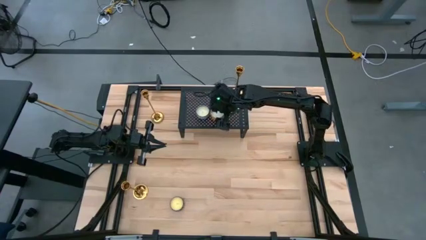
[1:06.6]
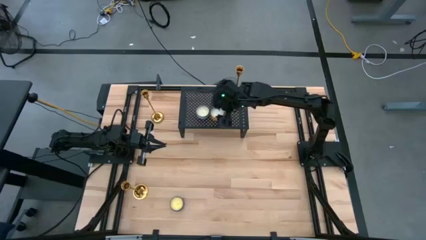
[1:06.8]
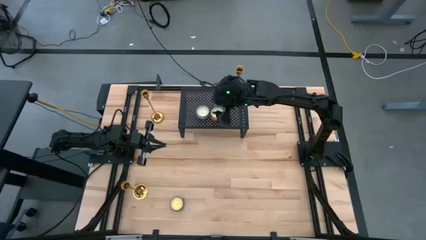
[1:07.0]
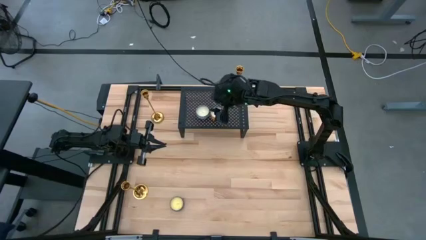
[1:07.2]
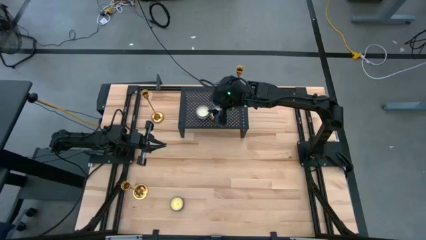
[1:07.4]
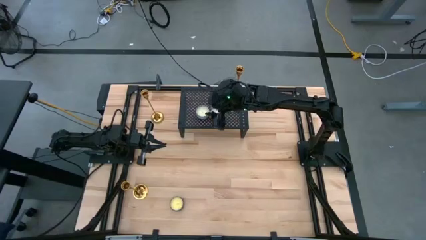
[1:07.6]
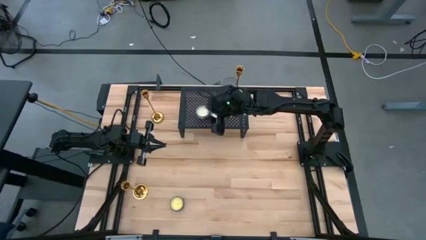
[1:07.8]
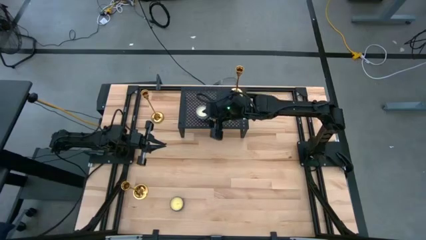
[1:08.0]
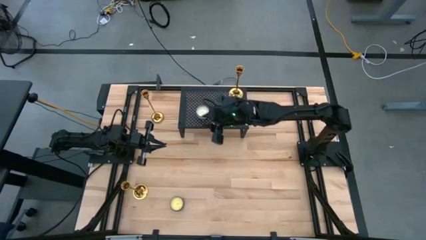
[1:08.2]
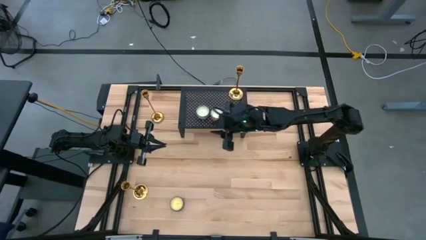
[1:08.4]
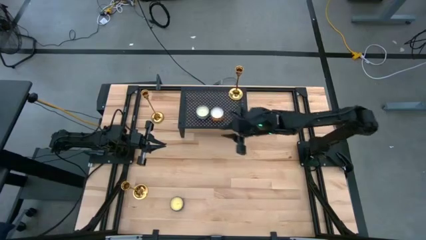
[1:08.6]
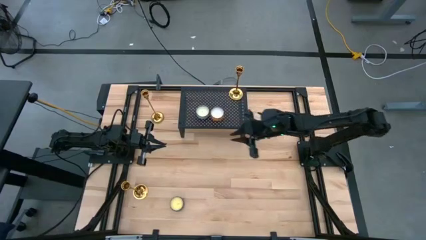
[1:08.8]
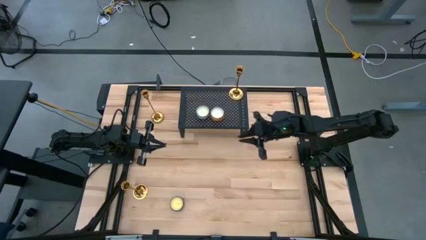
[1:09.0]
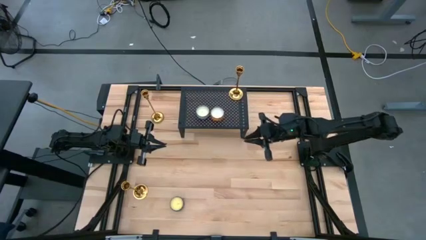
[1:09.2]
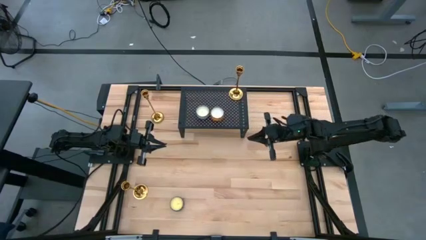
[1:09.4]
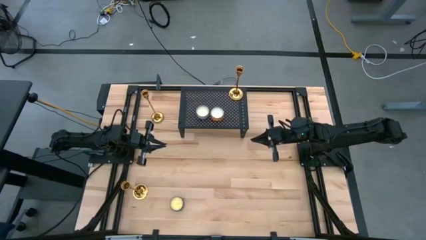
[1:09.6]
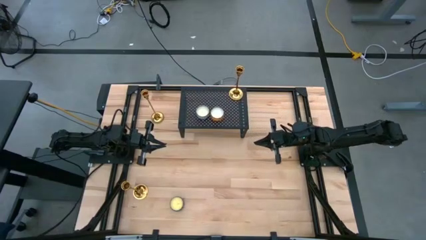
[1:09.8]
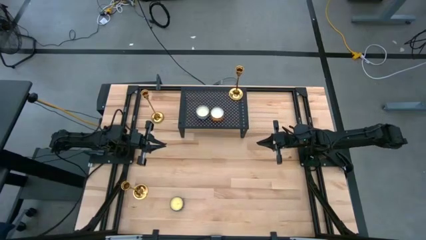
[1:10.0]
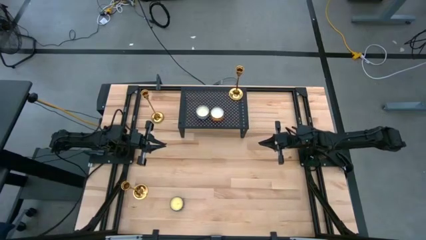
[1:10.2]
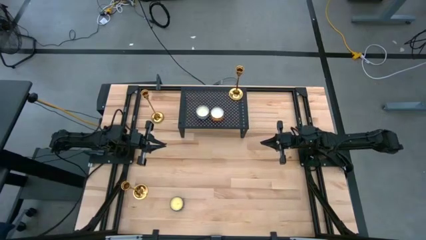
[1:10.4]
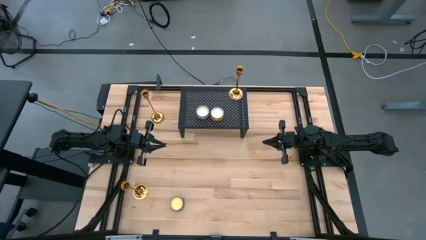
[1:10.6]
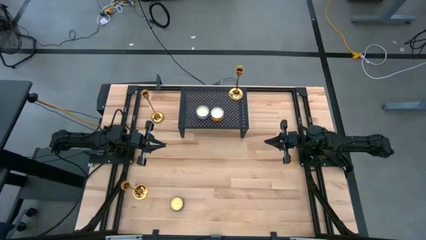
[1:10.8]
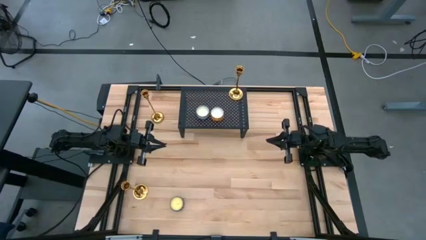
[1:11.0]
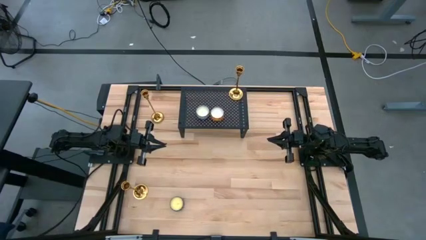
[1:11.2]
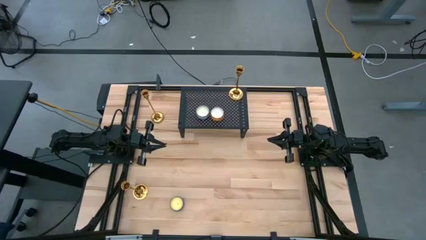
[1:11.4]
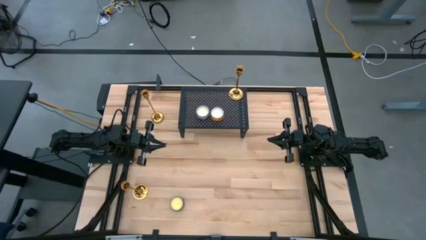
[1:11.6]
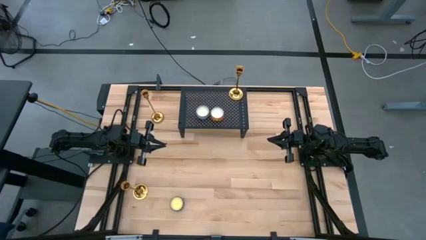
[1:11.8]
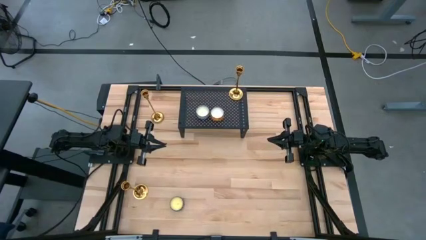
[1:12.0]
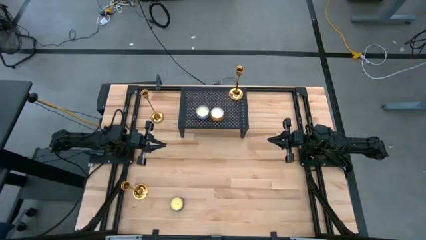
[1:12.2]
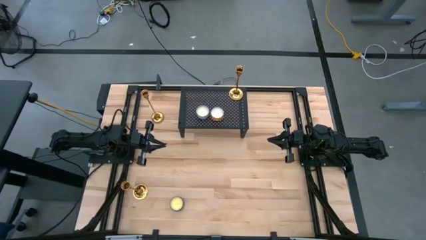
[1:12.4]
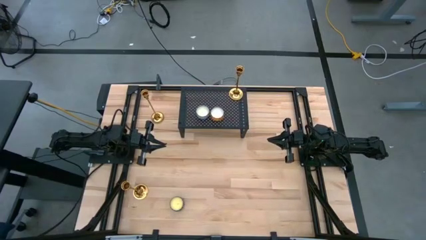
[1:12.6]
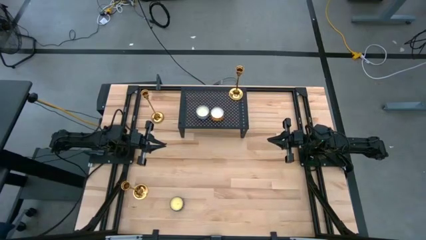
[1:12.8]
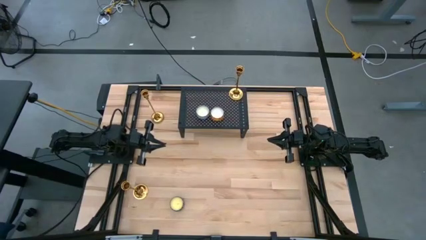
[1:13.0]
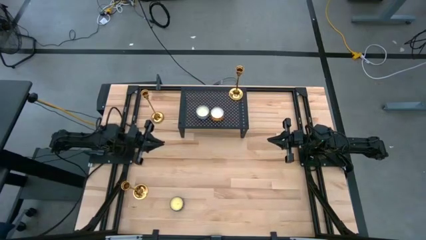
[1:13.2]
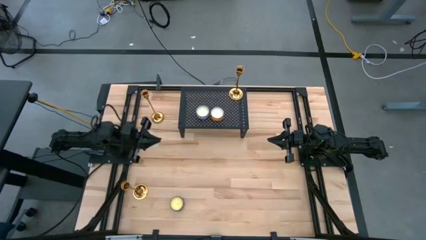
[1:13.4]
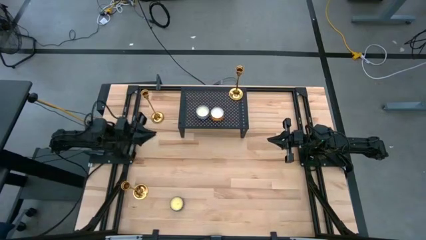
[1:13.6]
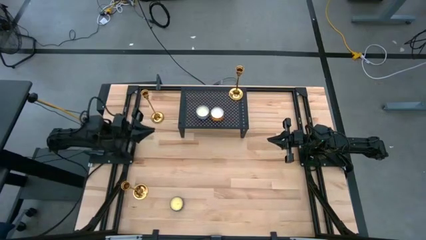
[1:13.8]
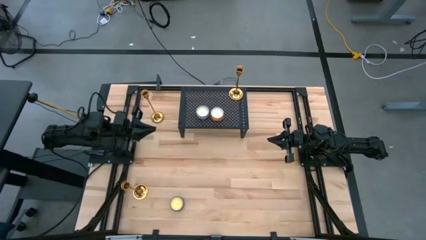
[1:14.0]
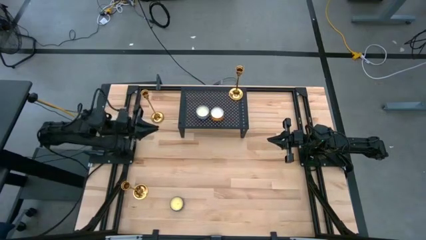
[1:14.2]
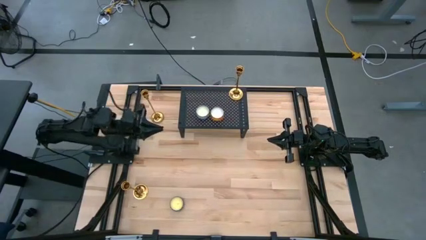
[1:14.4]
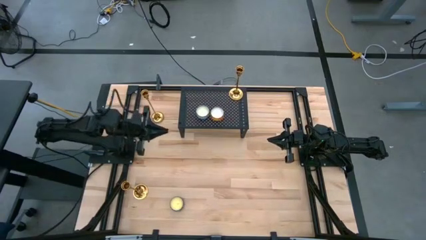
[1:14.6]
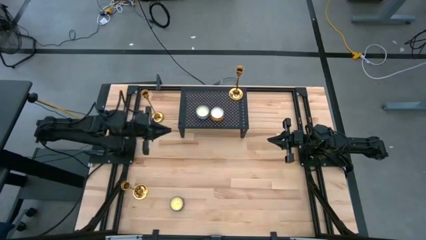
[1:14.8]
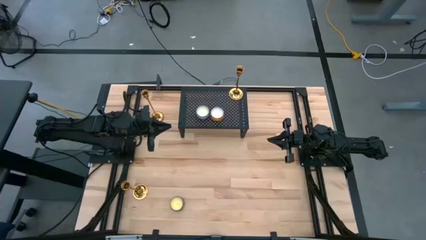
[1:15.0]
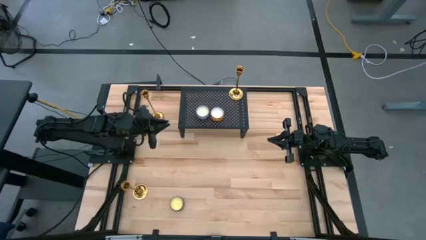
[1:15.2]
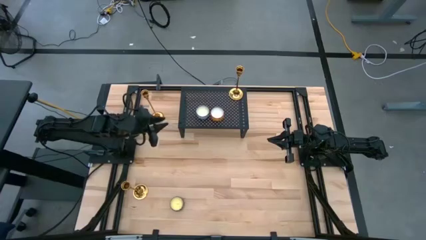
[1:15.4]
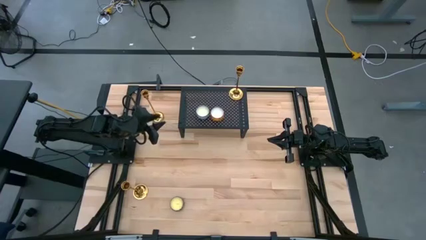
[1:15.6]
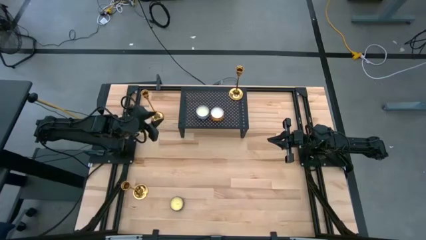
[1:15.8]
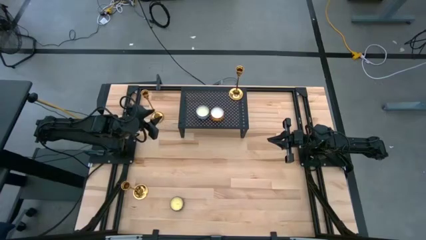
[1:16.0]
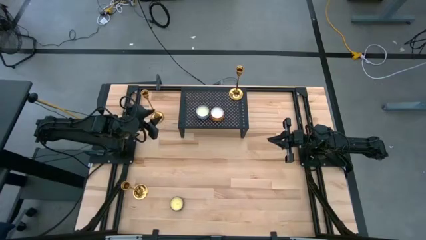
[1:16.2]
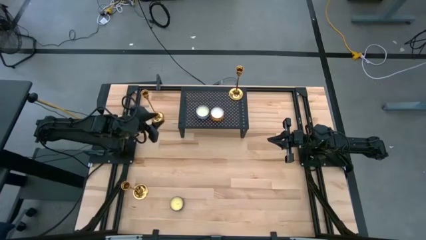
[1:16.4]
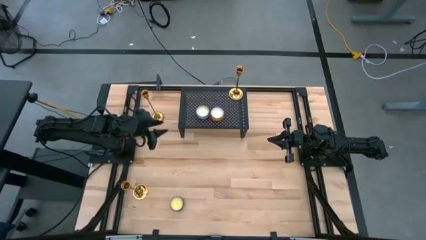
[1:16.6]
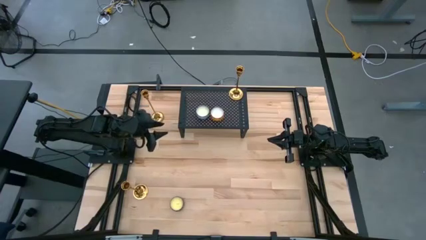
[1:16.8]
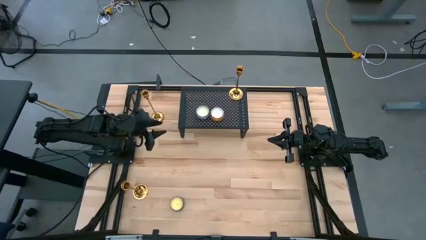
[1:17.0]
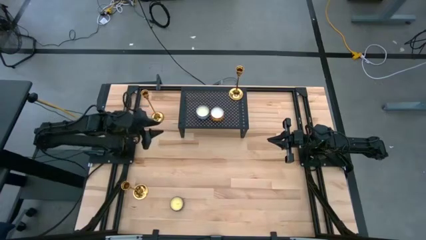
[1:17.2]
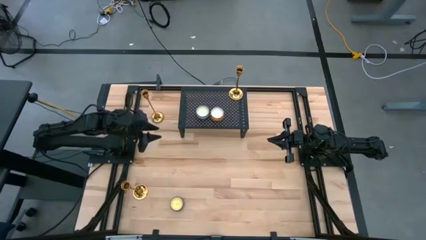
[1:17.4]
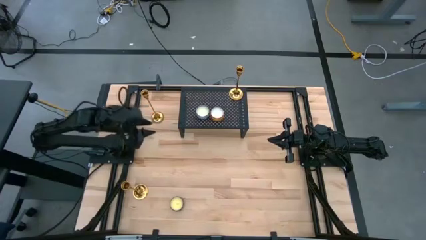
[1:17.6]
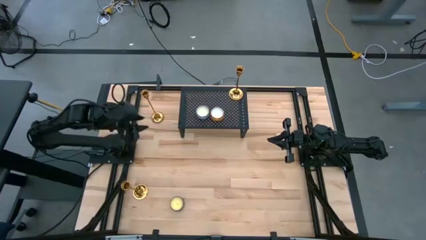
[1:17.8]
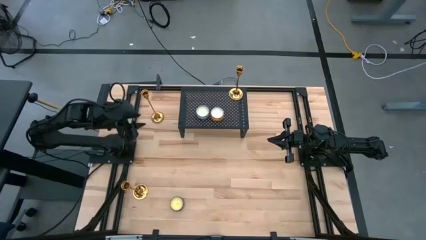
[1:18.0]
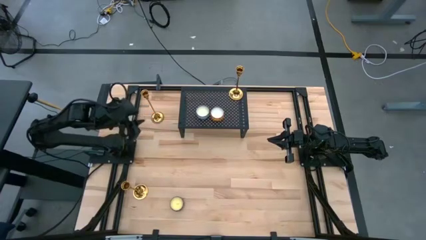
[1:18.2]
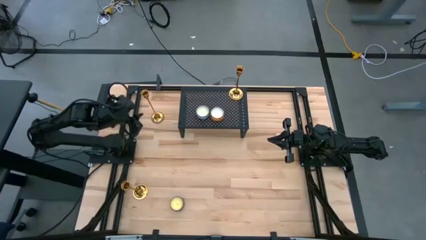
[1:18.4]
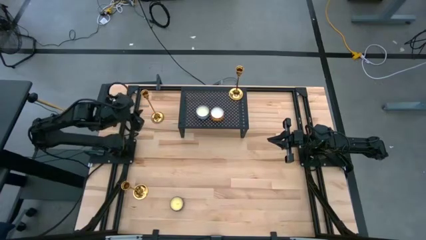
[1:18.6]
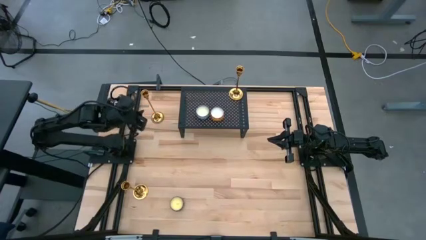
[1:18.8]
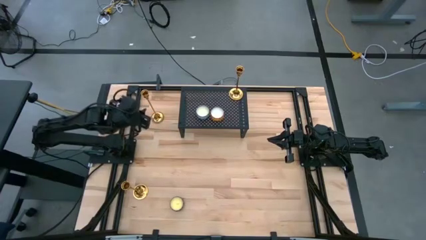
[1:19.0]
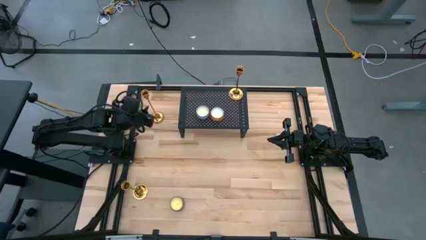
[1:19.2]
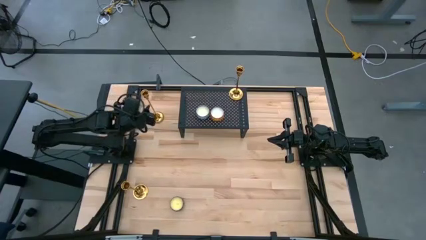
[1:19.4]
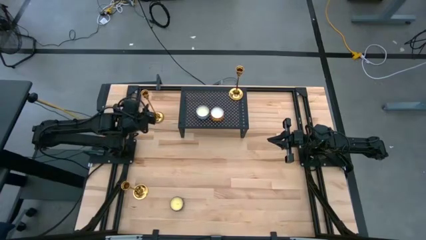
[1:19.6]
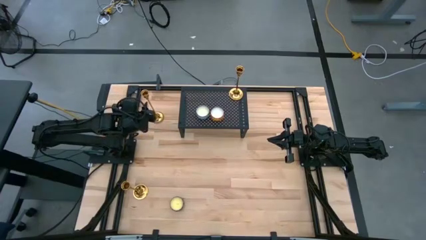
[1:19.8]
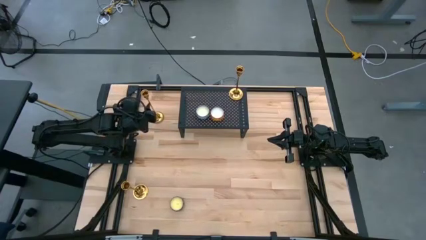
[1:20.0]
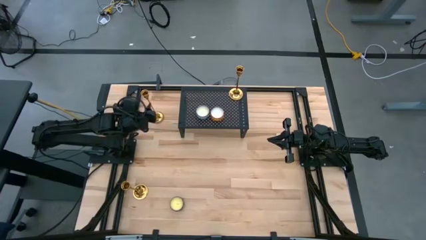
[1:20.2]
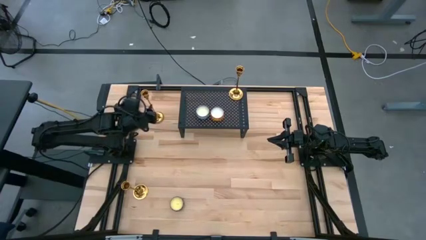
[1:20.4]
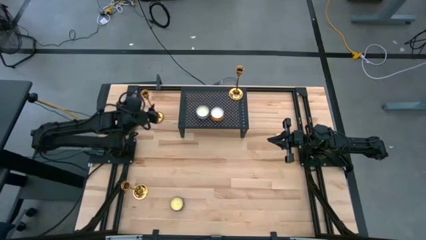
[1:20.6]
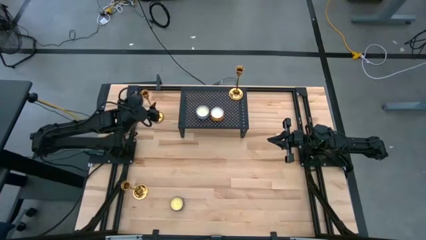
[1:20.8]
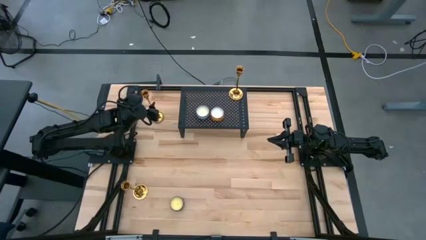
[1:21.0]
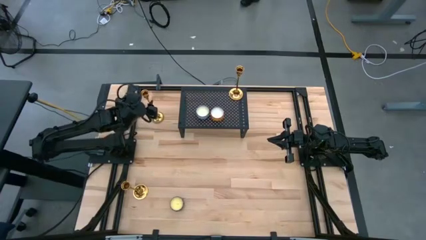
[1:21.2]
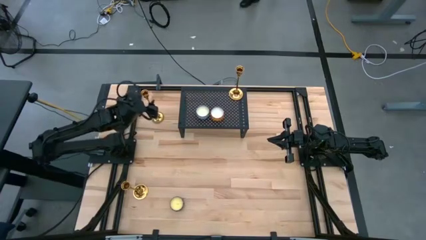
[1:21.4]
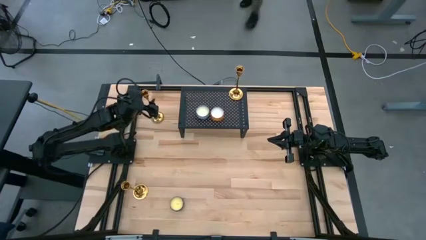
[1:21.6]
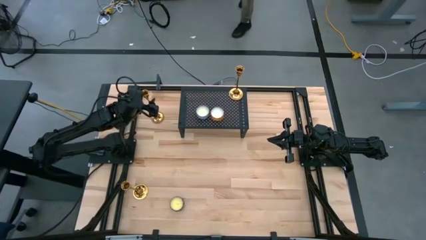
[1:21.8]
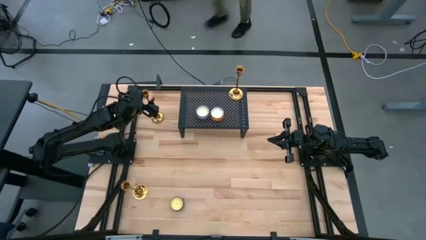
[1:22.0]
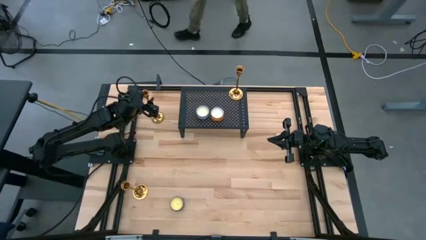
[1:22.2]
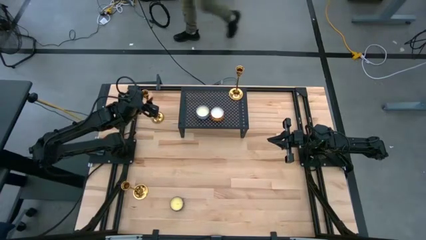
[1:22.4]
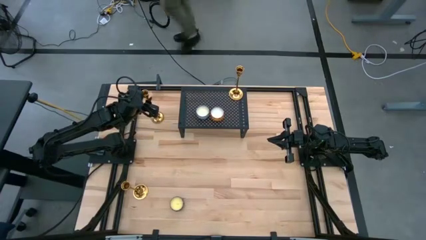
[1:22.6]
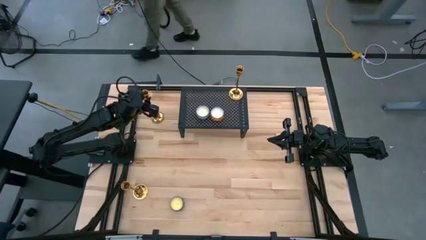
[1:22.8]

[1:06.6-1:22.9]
Task: Pick & Place candle stick holders
Put the top gold candle holder on the shelf
